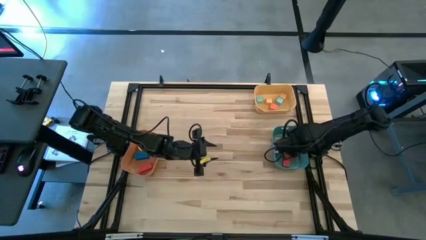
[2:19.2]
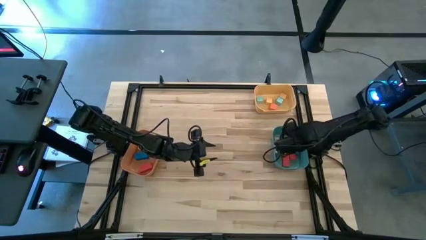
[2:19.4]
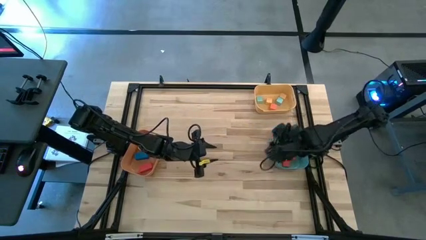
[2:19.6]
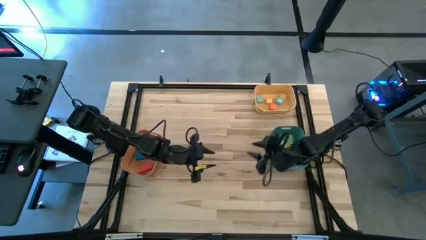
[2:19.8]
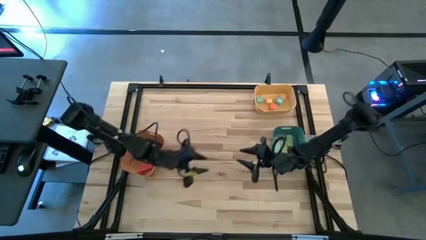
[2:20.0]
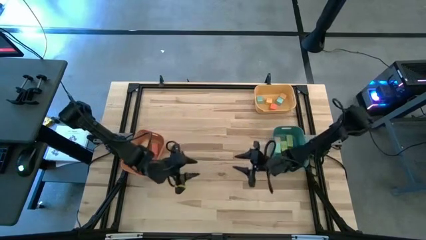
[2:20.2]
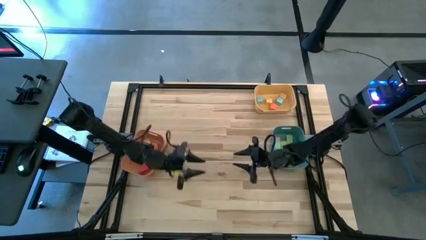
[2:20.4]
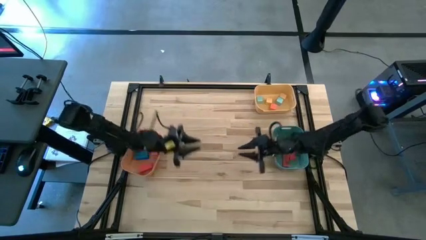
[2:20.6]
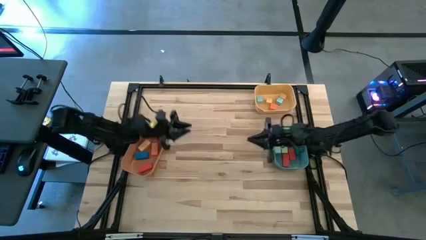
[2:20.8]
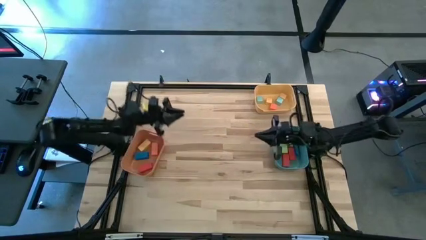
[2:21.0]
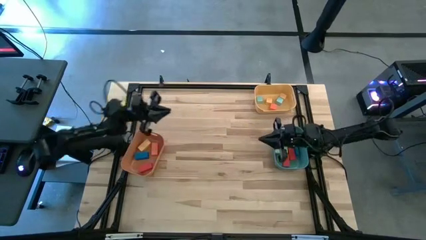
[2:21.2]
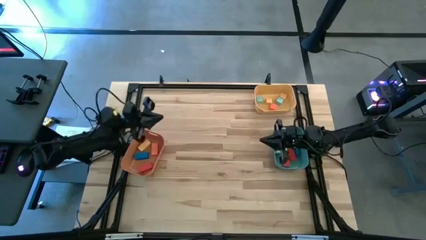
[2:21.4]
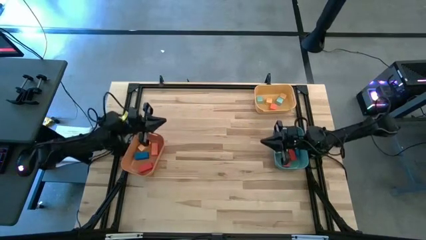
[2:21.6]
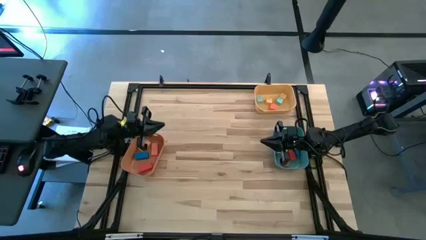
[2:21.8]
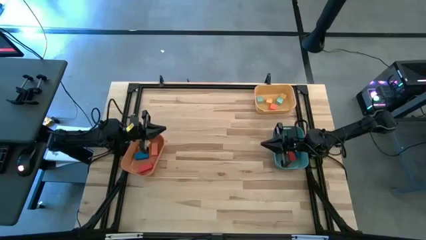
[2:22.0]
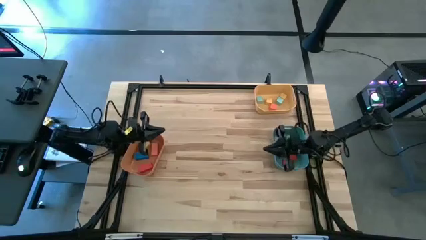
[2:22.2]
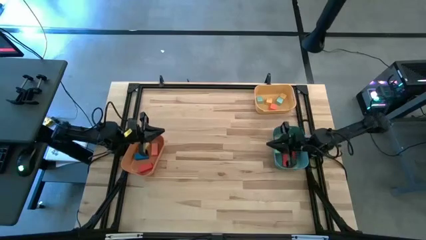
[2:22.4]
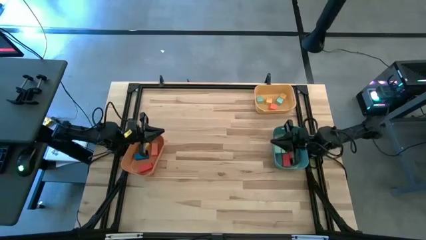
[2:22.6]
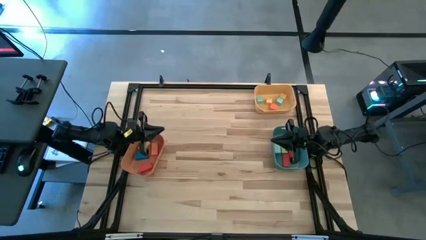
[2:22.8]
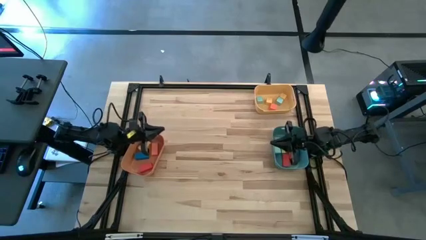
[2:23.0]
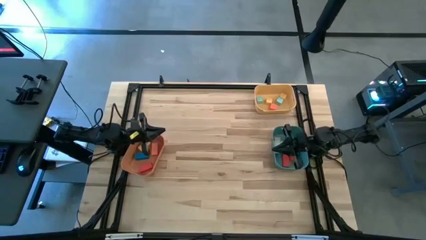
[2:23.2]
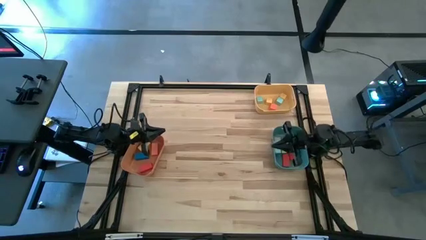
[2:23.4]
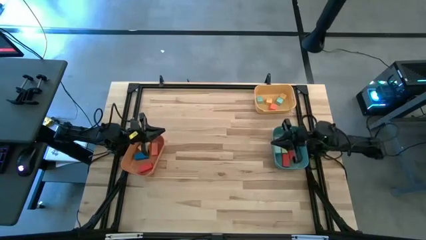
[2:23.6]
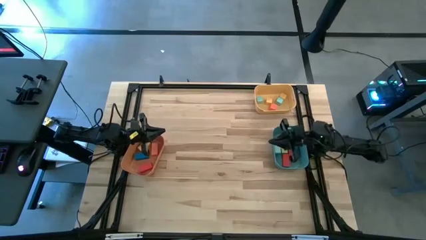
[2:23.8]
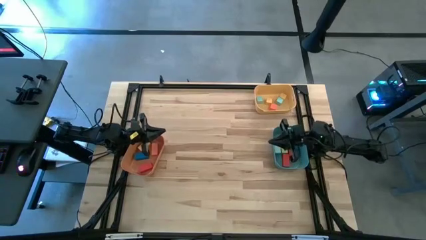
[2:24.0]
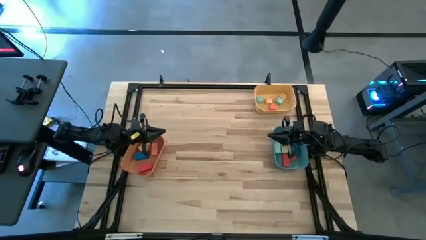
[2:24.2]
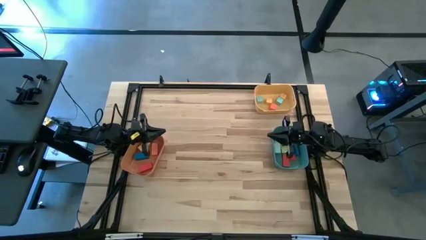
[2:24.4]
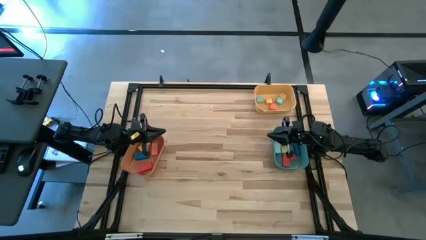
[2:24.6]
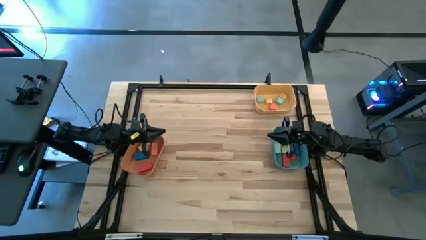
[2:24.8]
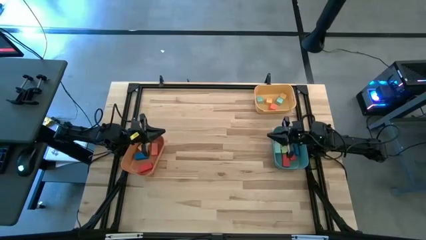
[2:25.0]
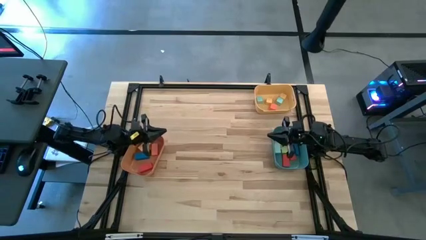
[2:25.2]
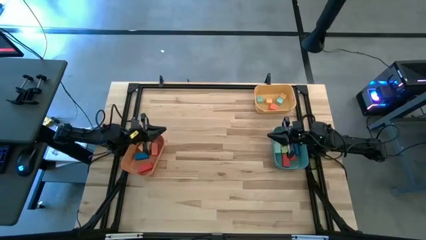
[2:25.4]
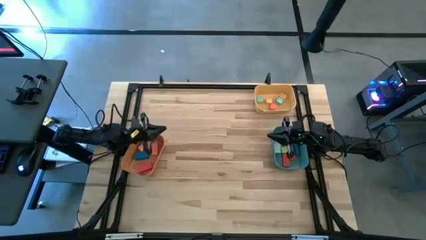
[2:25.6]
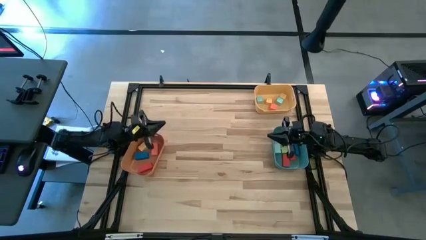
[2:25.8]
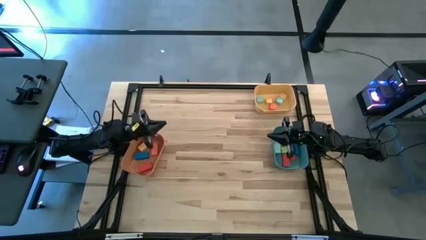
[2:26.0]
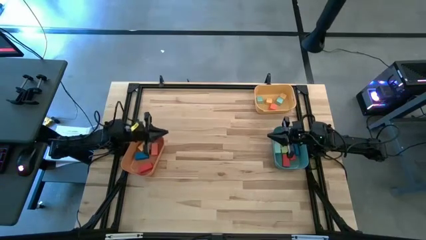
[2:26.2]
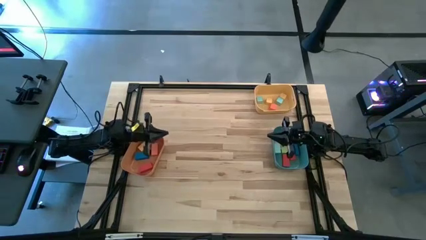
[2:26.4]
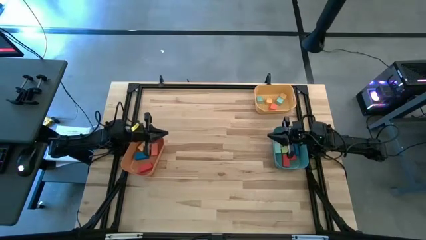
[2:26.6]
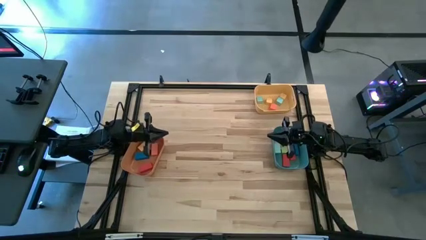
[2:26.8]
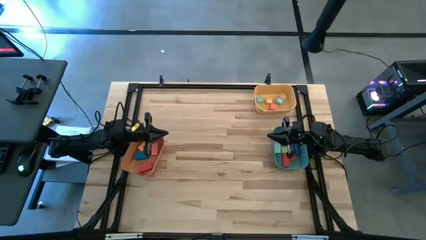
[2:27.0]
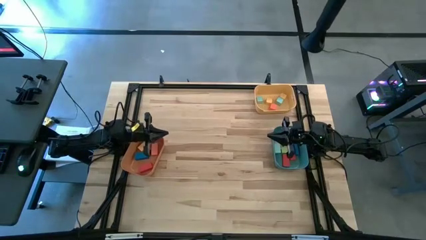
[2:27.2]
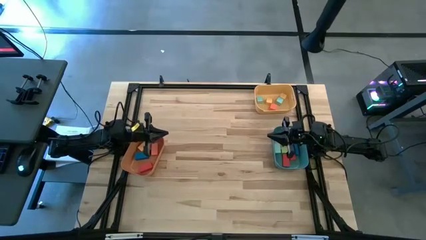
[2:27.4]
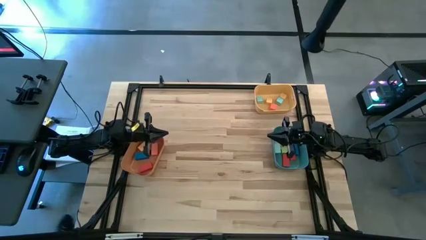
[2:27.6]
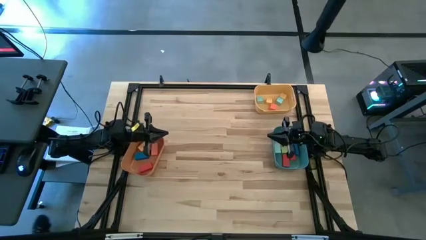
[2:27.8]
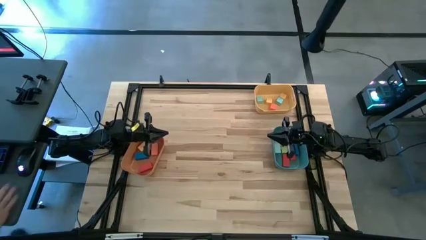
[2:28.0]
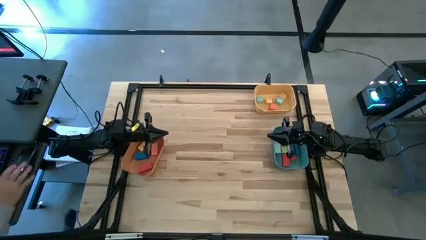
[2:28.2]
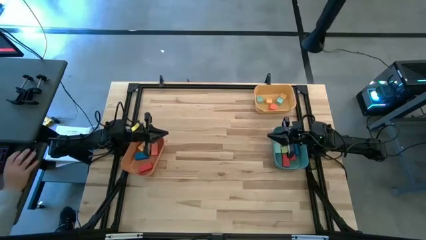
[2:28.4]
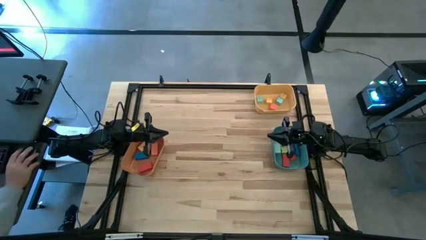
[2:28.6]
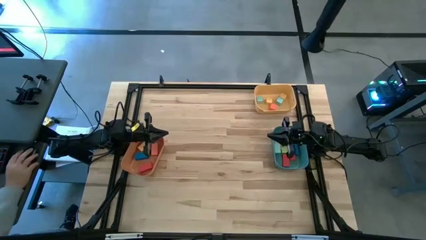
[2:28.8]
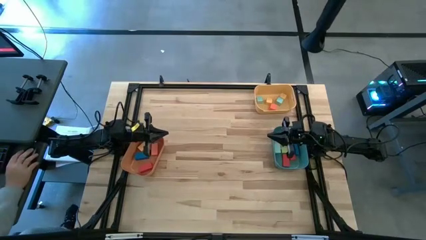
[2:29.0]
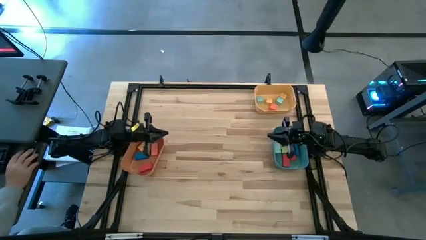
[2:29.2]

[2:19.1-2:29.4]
Task: Sort blocks by size
Return to Home Position
